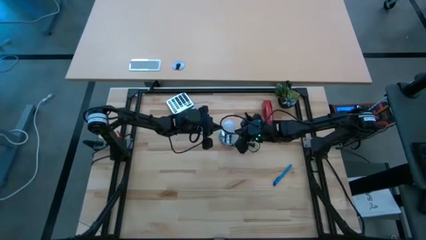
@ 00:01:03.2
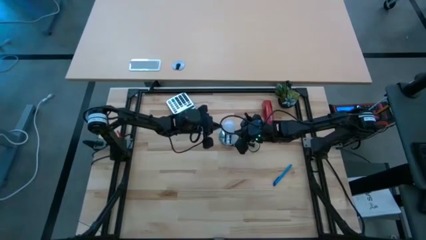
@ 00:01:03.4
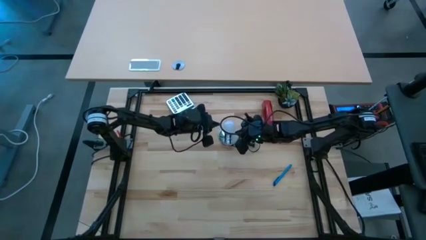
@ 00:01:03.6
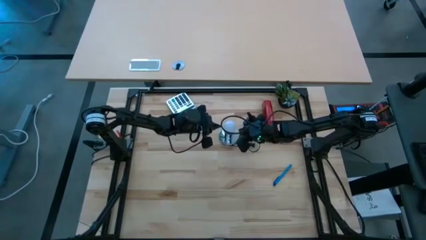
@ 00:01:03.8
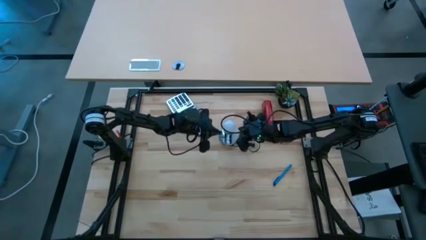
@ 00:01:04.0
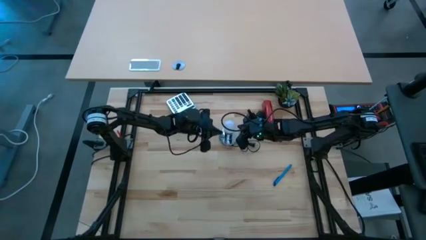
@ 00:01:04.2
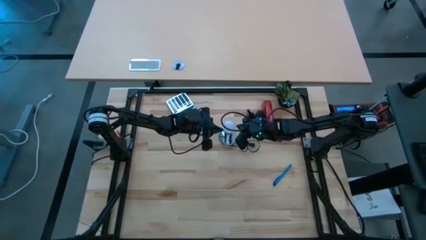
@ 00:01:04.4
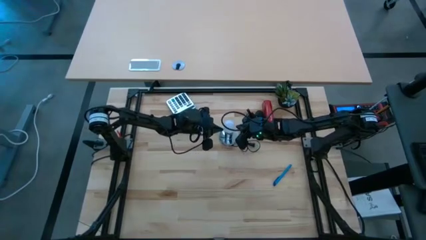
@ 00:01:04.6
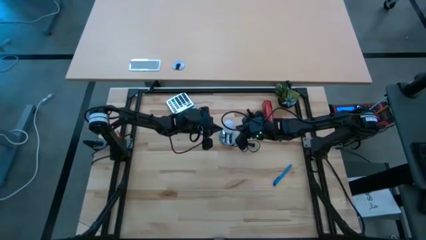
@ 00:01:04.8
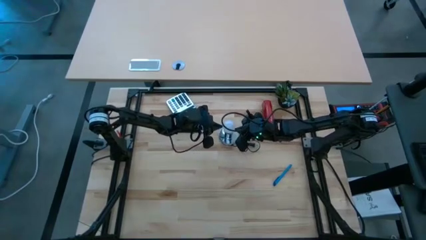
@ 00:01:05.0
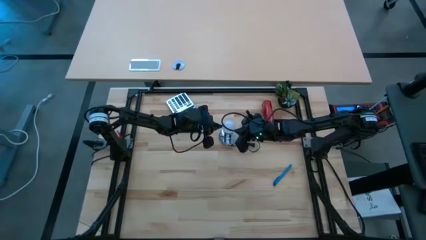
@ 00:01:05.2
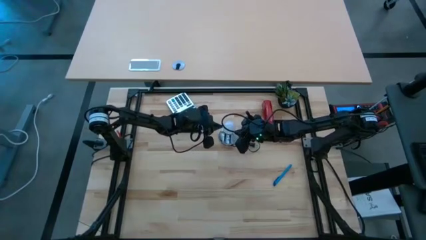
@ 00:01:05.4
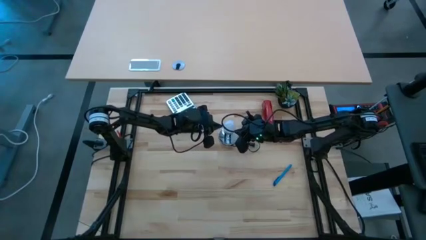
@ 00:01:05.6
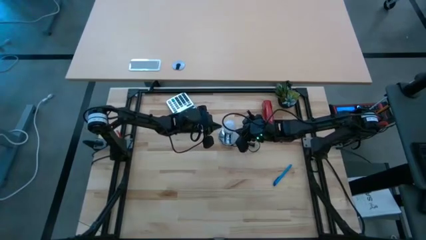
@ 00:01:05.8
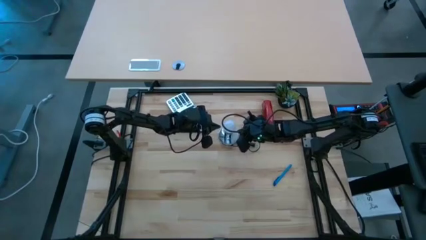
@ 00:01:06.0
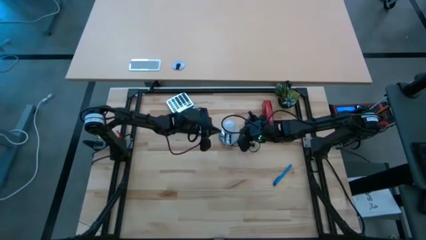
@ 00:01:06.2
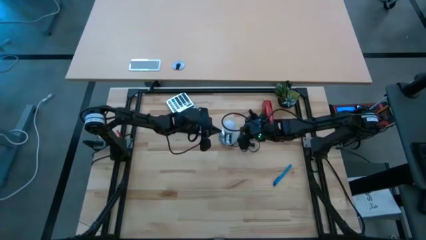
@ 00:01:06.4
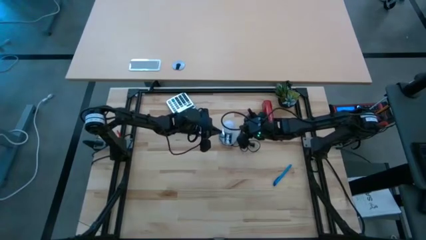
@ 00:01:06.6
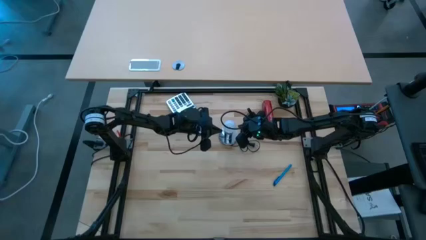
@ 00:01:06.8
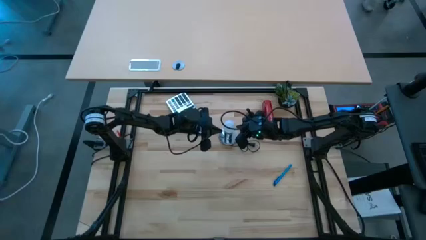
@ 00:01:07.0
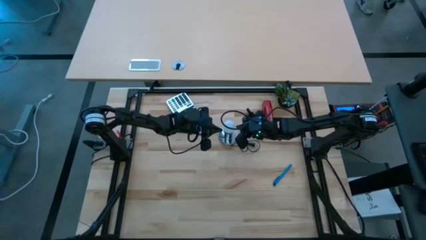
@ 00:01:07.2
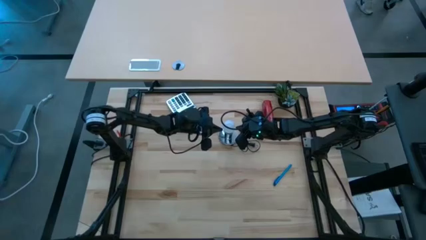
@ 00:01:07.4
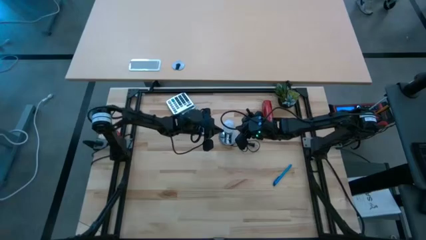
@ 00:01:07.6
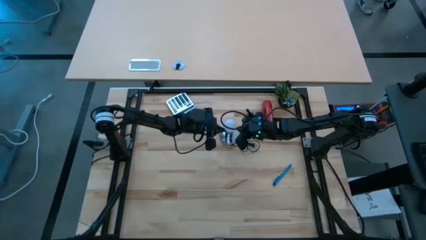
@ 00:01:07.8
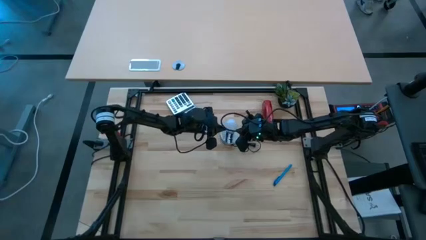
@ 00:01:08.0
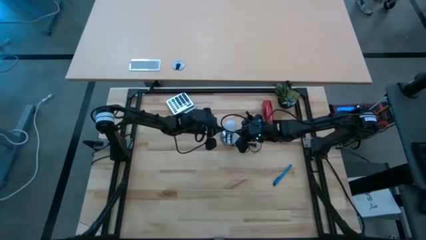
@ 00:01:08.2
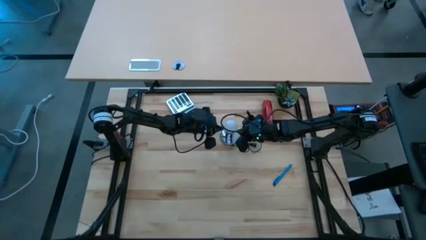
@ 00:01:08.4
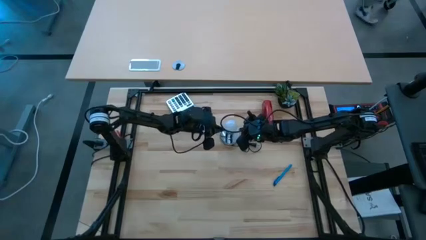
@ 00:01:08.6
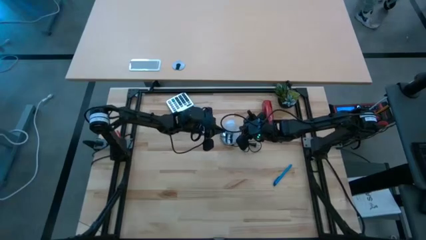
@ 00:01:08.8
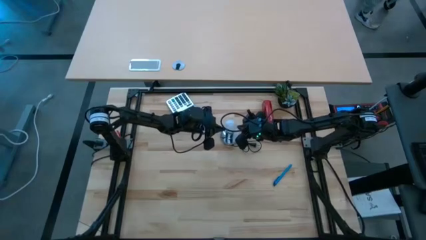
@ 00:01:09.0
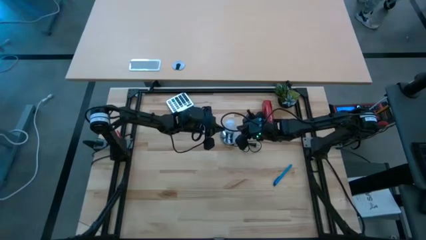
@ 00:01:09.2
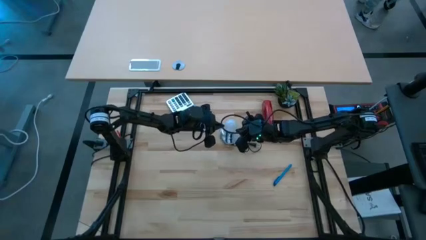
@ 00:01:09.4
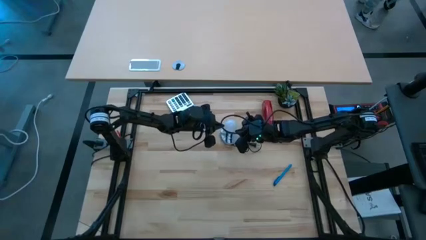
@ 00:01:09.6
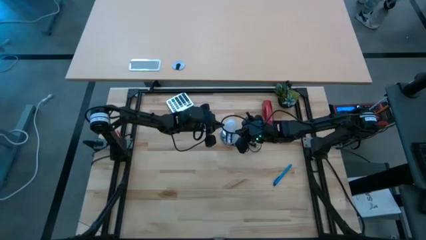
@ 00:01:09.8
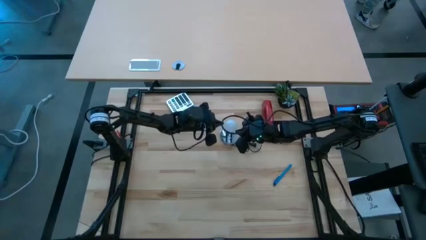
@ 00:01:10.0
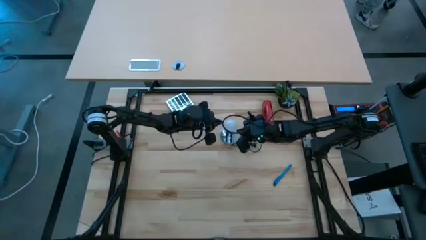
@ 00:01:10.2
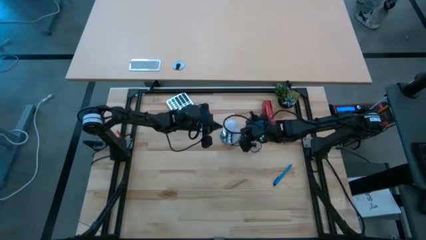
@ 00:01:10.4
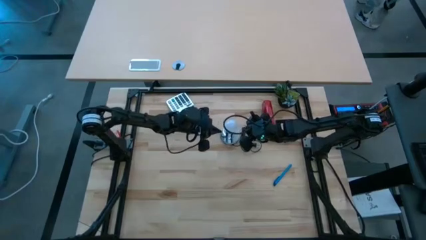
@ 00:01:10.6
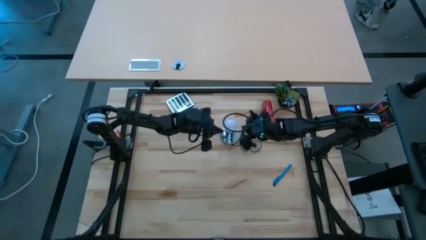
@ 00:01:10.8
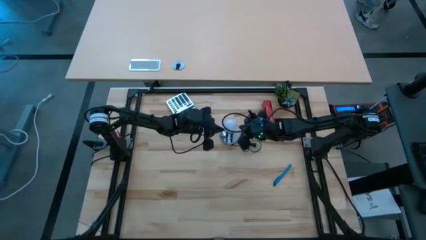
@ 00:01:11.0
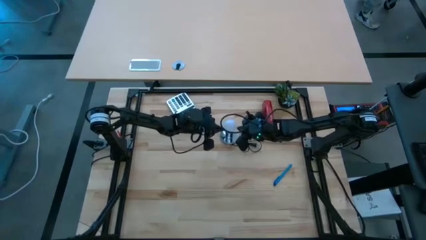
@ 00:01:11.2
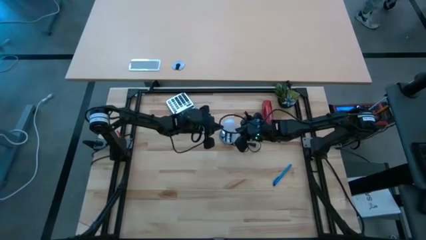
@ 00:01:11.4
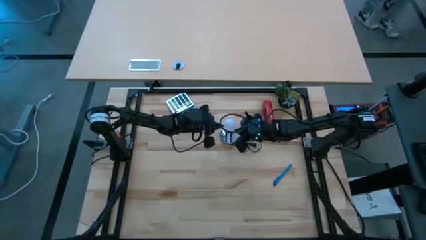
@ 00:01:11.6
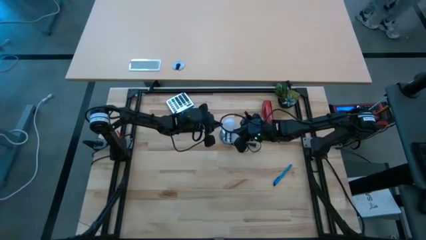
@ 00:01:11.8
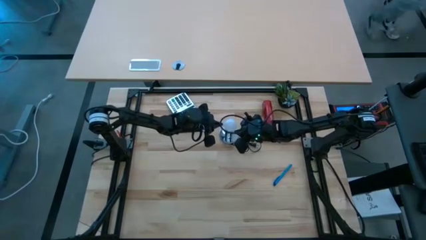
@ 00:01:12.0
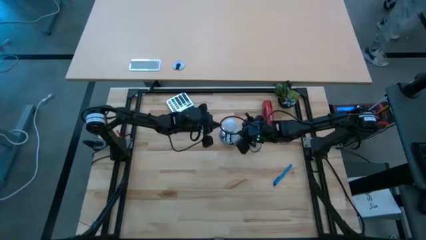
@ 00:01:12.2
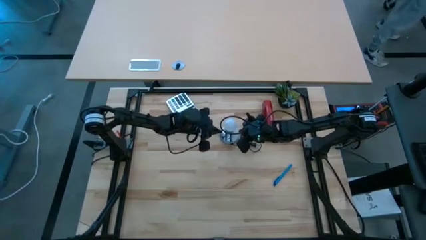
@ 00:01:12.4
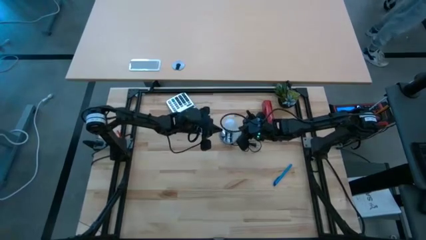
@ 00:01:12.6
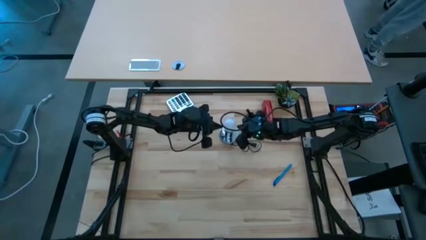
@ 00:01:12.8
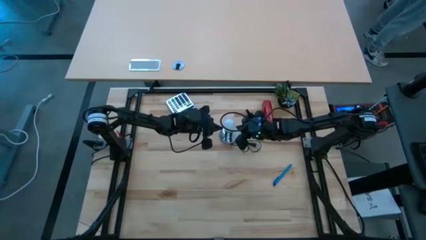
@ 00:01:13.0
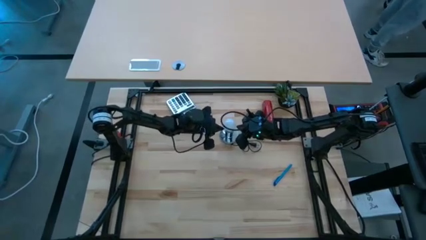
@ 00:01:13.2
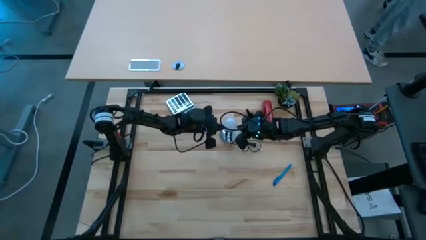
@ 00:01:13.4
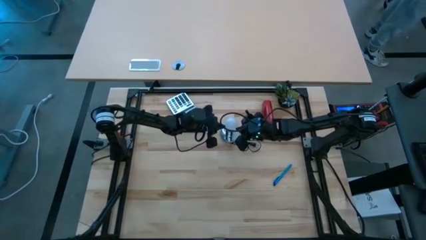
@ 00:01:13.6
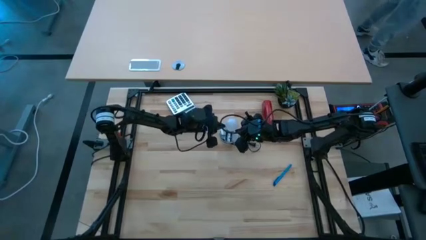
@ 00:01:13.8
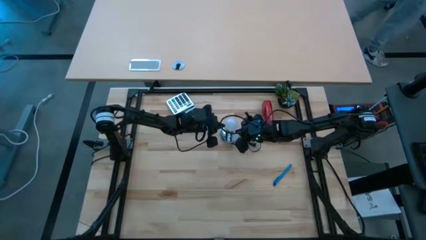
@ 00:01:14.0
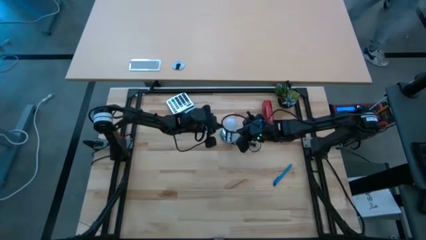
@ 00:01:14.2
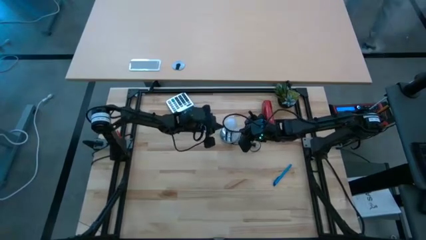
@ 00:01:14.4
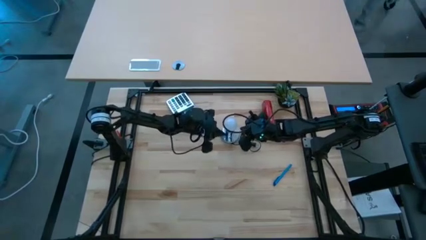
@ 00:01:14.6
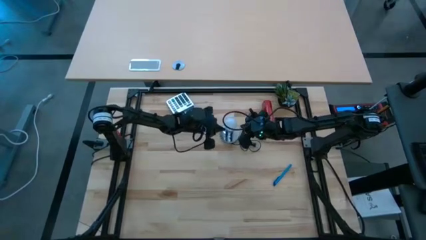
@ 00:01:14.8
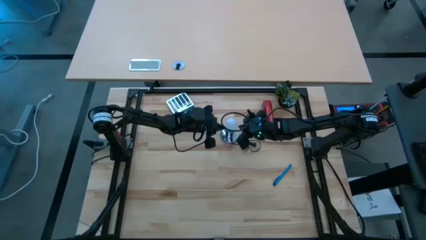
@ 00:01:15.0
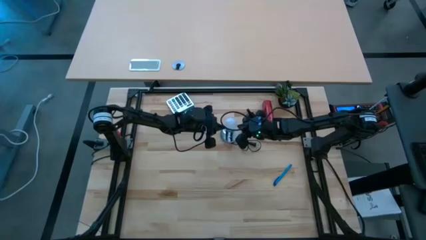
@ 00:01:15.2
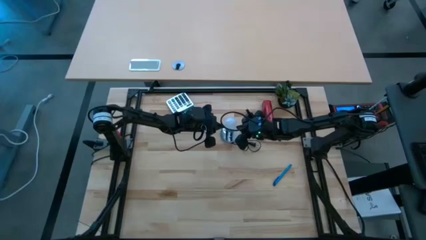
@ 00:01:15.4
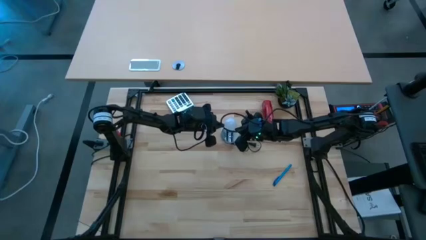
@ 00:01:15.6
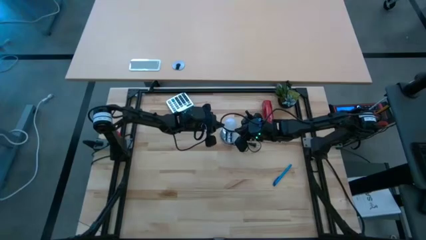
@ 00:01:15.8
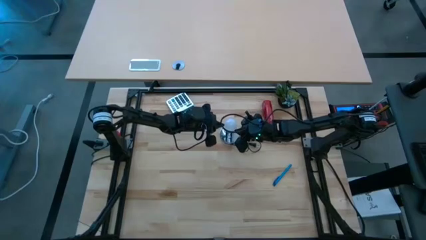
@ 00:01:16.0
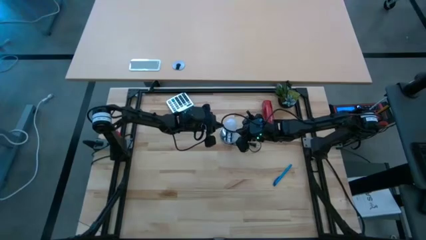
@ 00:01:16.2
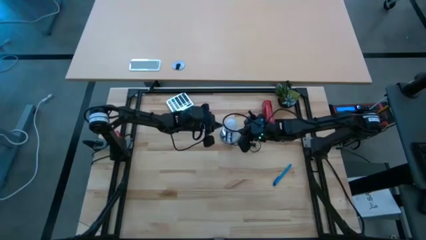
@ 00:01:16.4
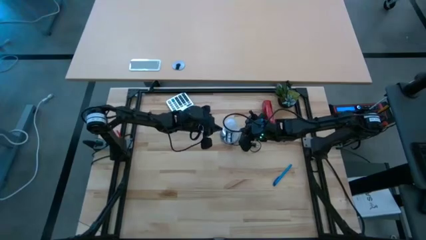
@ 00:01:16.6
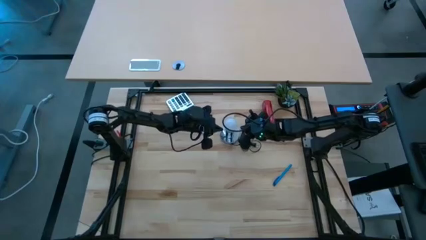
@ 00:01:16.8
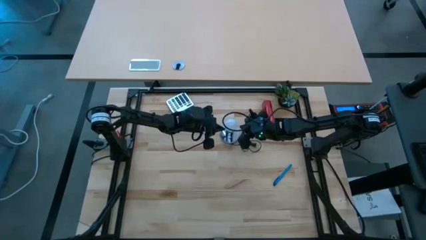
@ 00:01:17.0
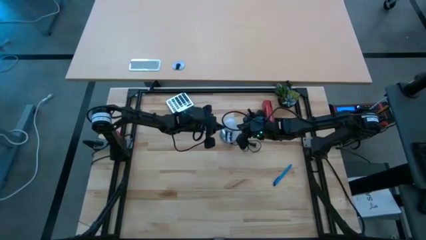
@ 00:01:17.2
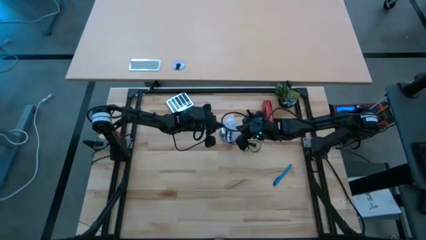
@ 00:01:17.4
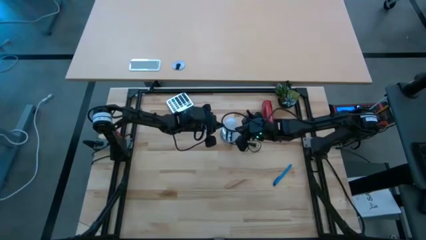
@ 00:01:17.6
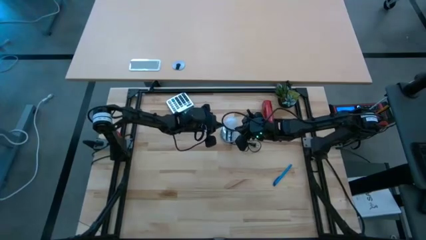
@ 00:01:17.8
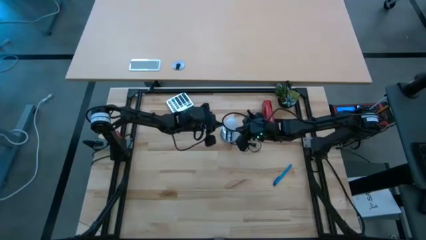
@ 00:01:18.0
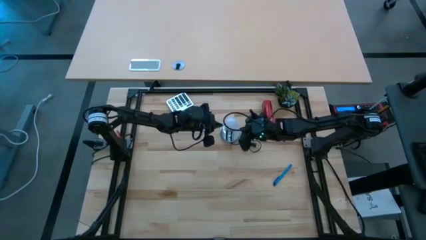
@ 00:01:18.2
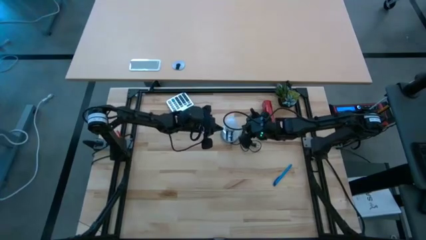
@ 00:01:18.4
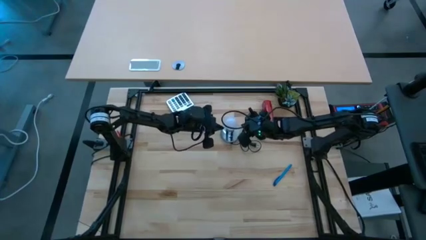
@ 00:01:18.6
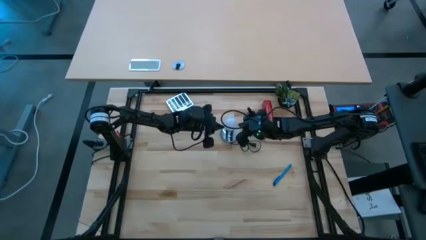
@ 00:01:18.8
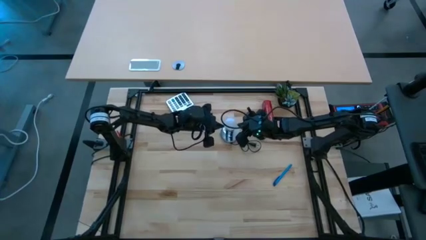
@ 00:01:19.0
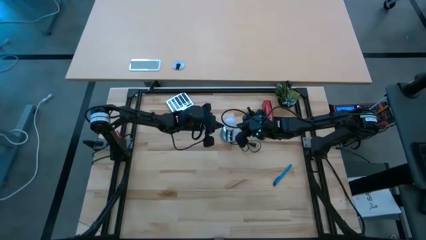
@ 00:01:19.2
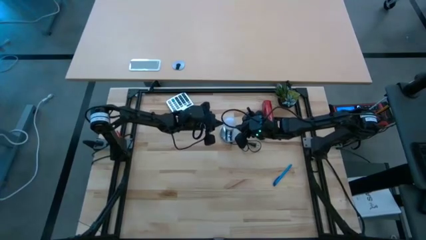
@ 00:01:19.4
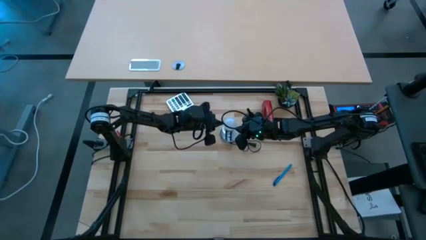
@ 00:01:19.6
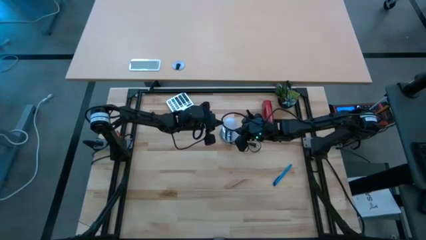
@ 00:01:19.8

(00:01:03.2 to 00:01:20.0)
Task: Screw lightbulb
Insert the white lightbulb into the silver lamp
